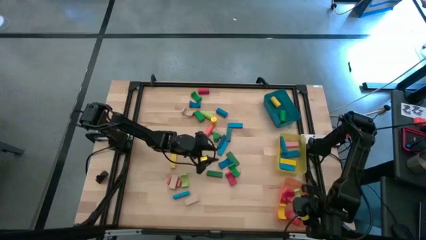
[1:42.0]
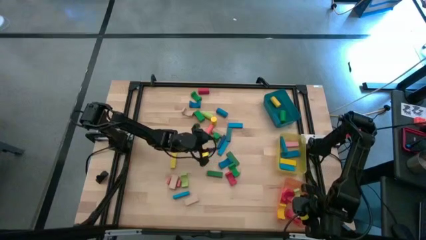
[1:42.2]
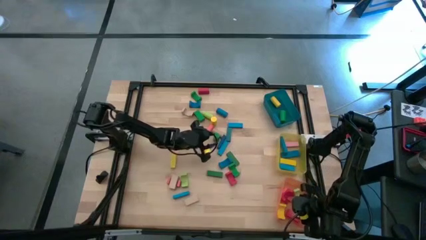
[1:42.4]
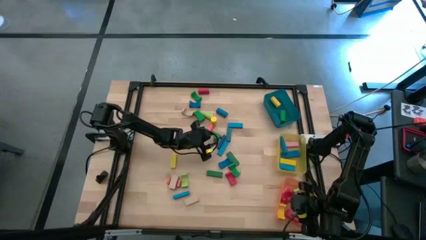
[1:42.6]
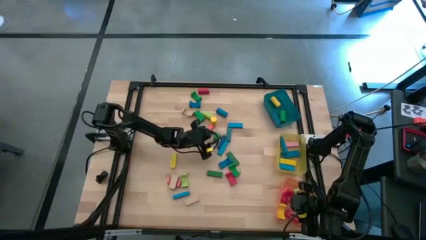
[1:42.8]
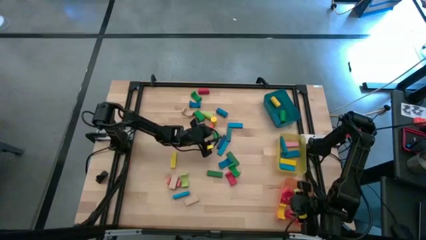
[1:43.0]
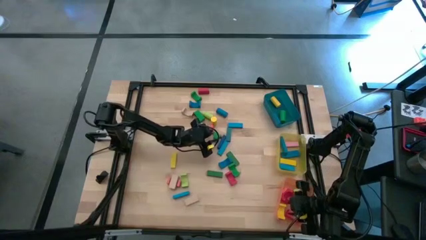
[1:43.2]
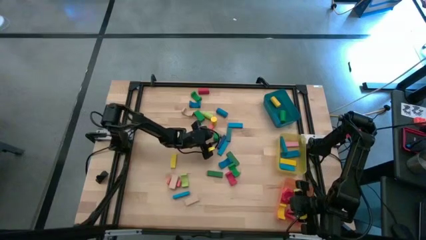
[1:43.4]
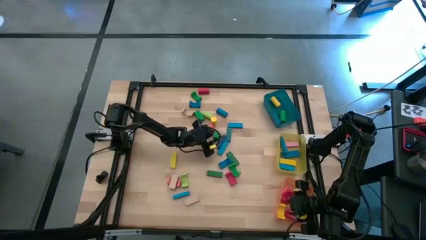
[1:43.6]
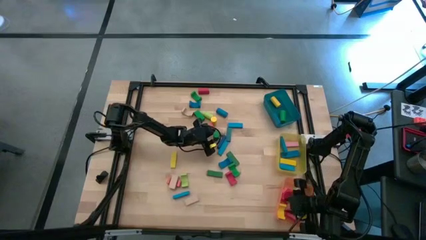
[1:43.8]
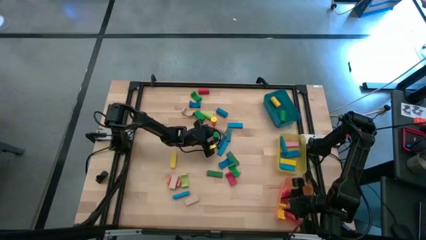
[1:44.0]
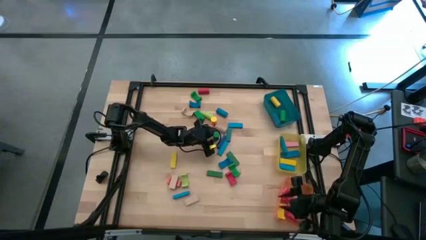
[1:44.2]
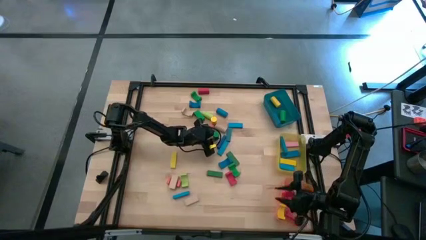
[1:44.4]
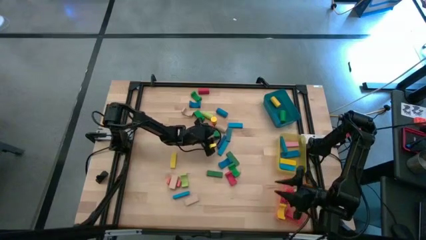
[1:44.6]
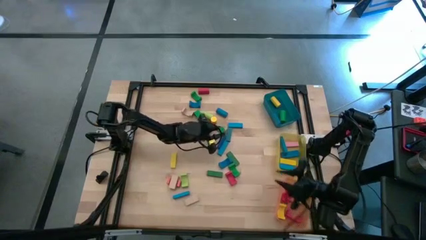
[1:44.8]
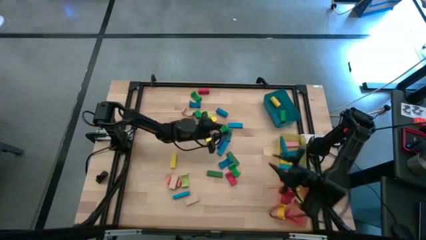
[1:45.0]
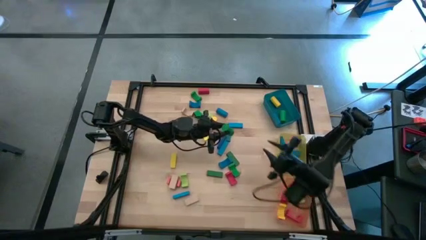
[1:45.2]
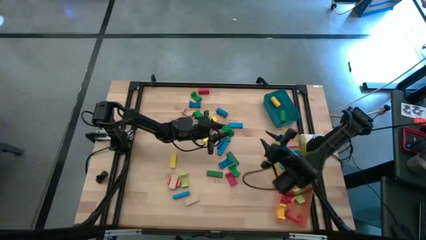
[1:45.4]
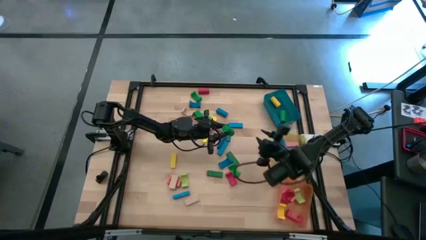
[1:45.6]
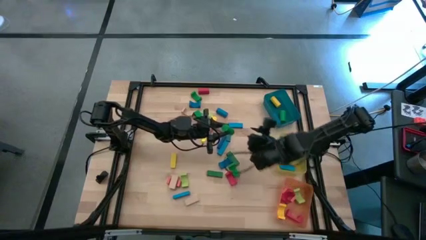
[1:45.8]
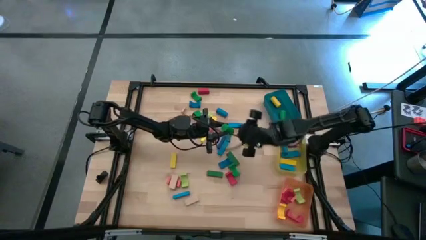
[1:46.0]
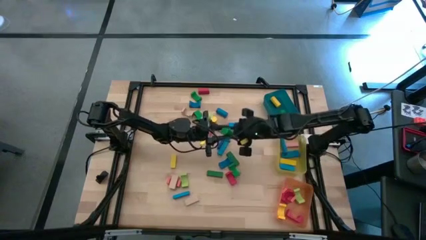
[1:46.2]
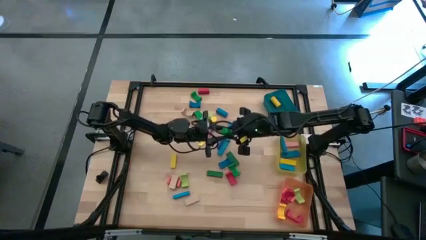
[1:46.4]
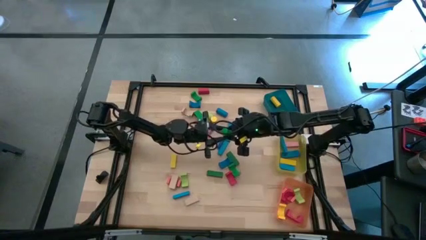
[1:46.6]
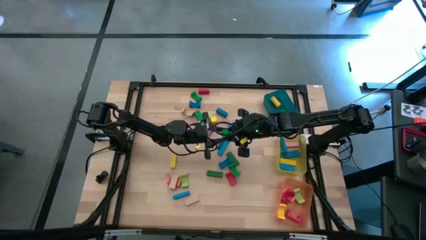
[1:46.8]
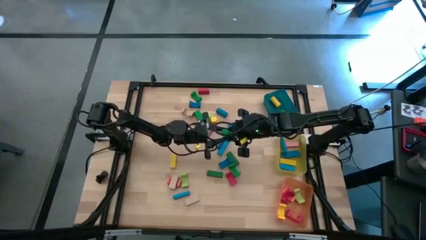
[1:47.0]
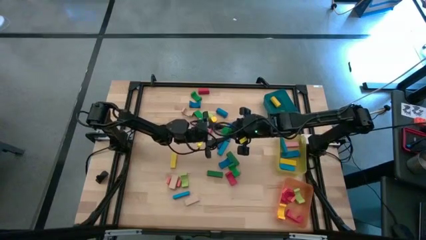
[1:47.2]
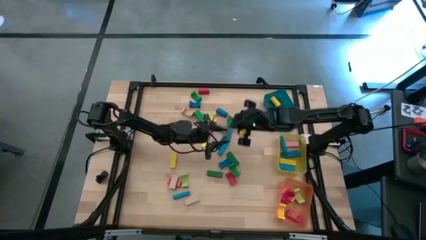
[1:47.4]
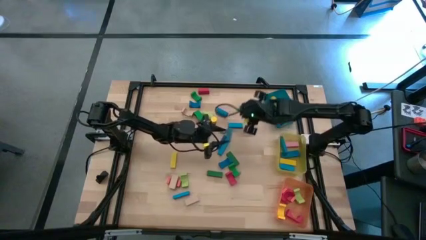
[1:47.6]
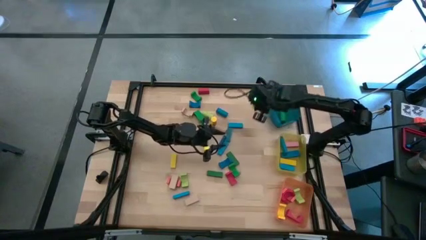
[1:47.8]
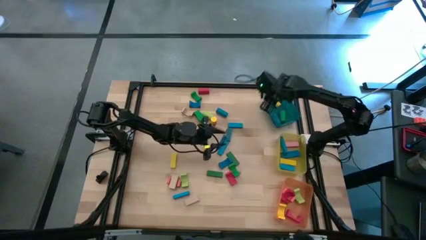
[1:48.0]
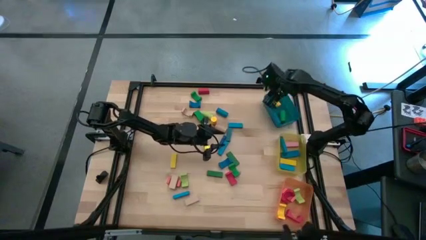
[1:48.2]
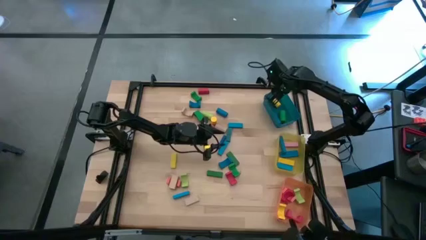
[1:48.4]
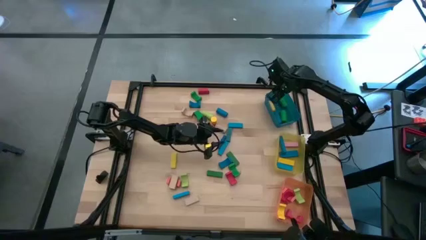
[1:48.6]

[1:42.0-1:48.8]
Task: Sort blocks by size
Put the green cylindrical block into the blue bin

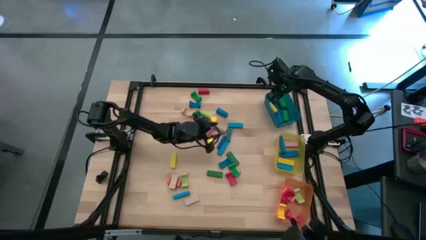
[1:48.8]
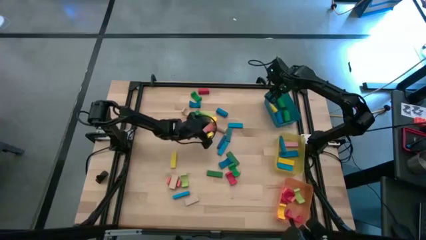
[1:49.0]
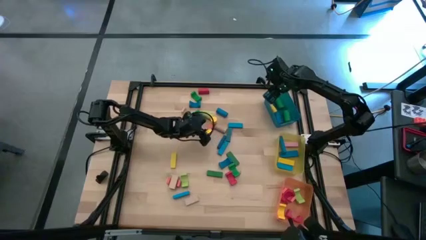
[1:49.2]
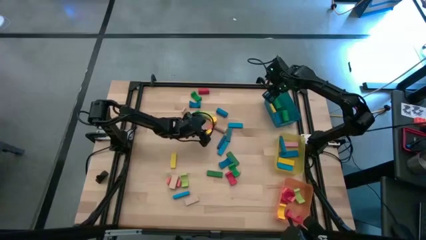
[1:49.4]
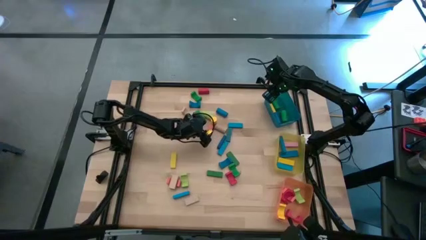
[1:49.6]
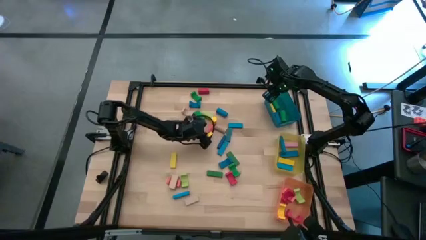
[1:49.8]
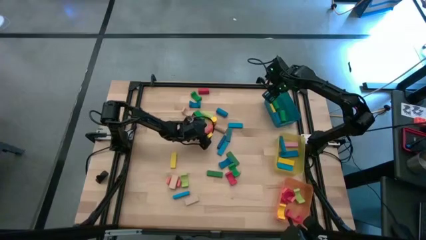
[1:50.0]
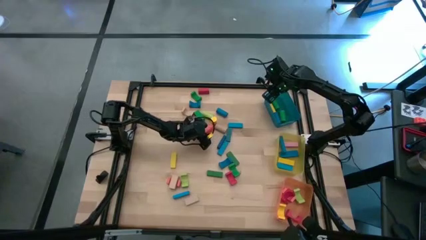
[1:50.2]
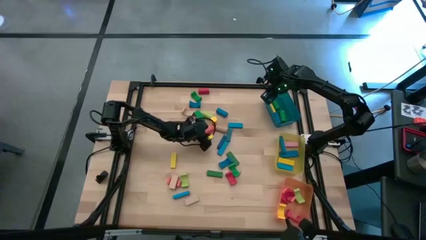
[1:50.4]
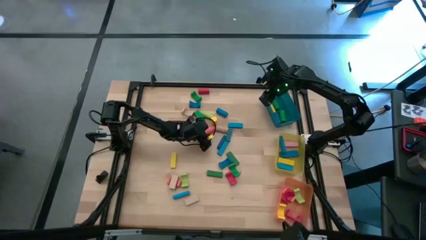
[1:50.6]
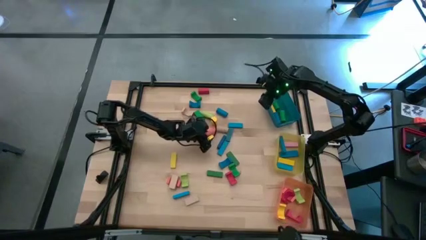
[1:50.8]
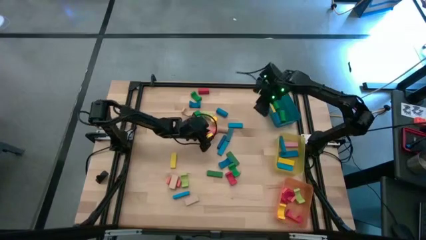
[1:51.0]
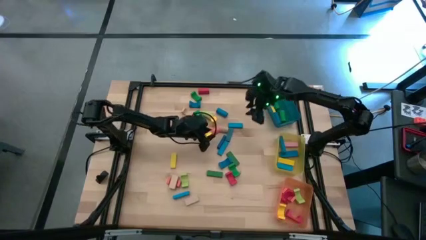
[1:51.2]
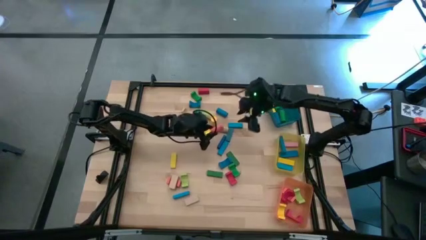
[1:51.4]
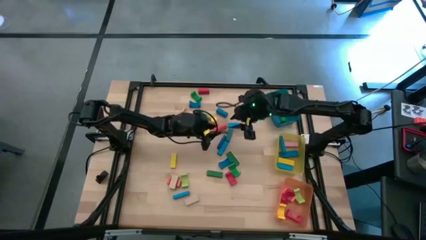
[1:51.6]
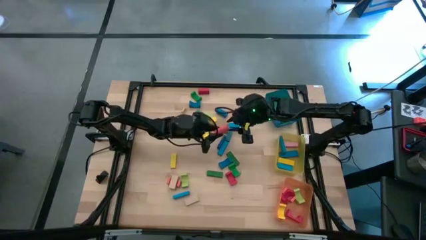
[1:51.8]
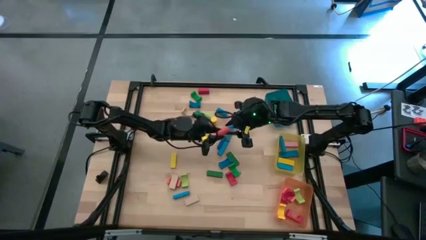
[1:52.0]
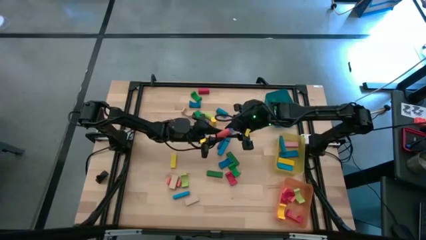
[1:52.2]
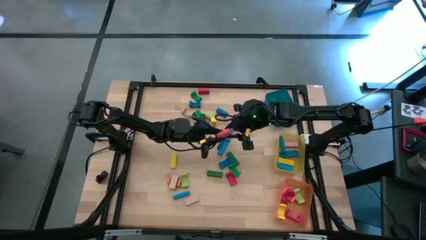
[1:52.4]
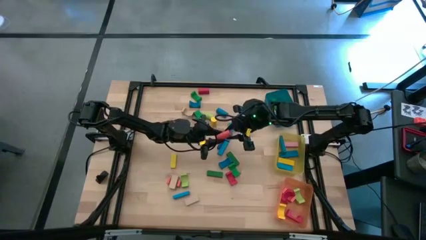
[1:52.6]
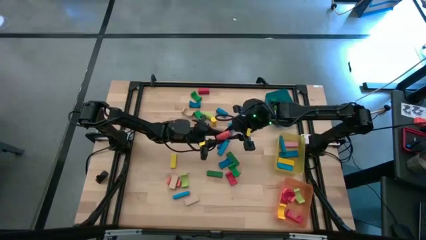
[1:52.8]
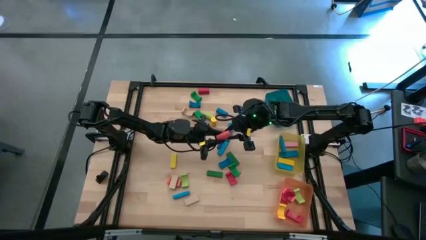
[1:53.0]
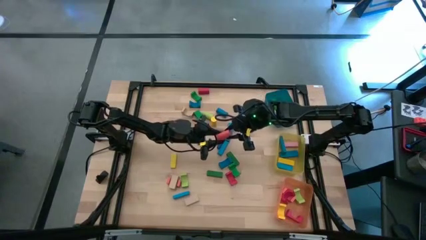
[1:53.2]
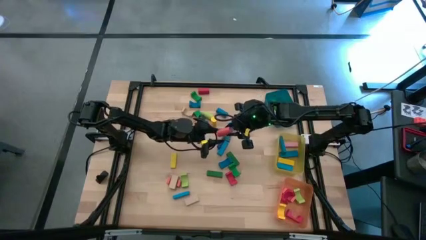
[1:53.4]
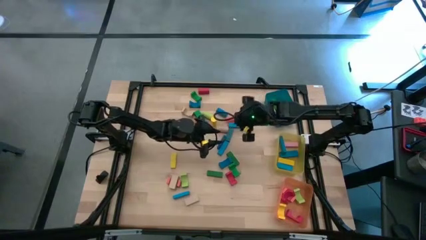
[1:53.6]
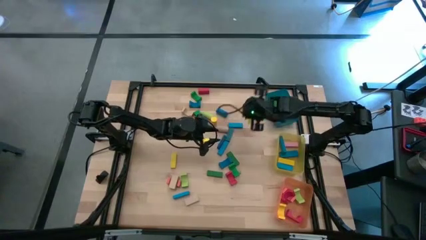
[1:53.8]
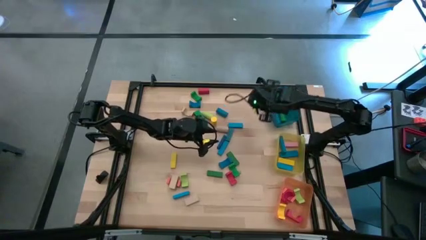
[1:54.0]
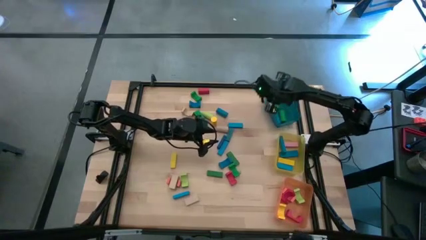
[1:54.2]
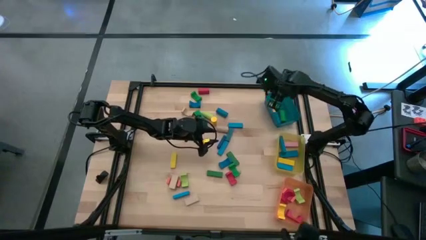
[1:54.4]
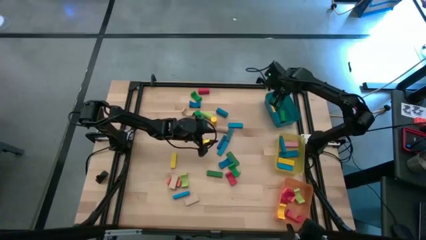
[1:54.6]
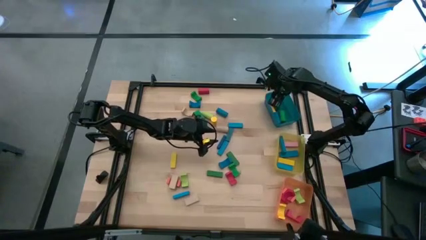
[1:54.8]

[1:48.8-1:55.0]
Put the orange cylindrical block into the blue bin

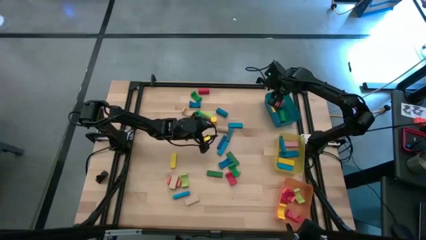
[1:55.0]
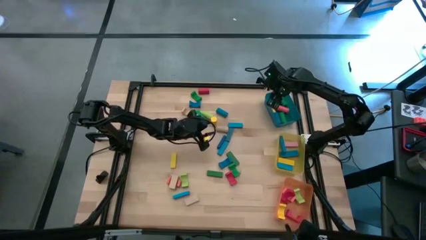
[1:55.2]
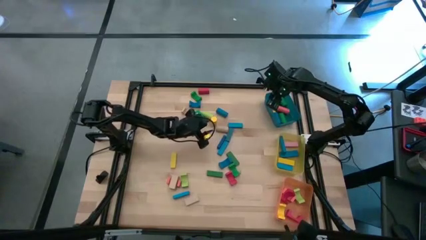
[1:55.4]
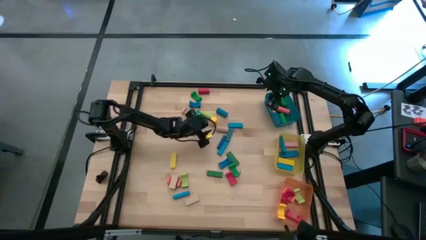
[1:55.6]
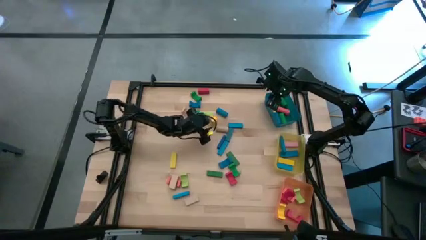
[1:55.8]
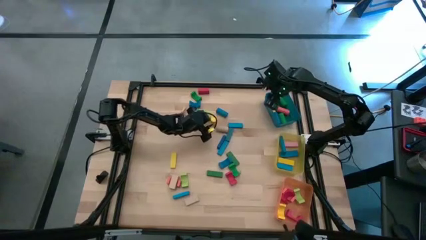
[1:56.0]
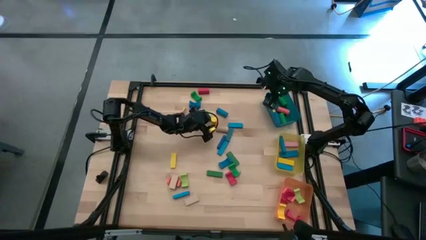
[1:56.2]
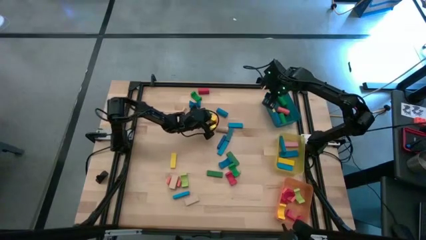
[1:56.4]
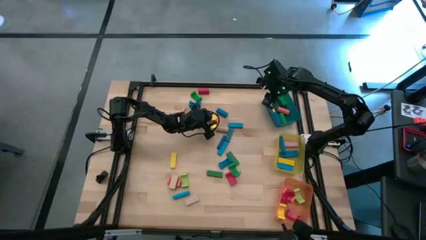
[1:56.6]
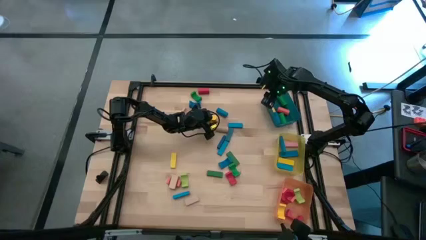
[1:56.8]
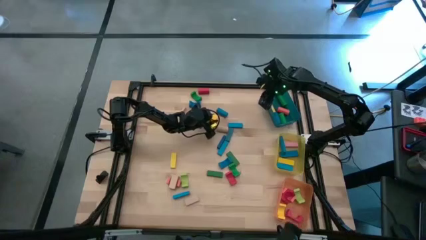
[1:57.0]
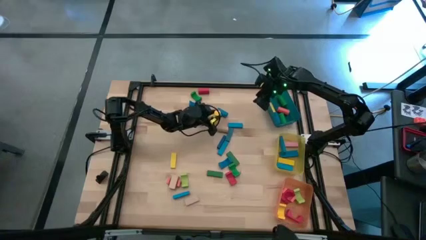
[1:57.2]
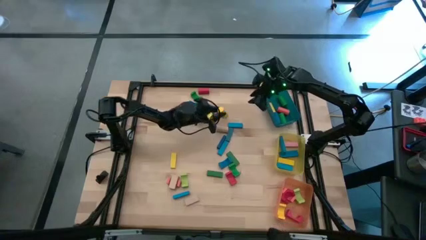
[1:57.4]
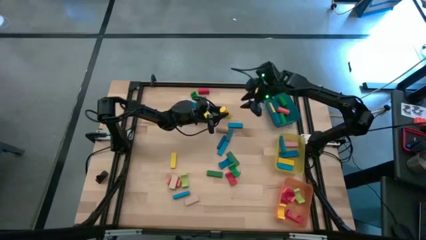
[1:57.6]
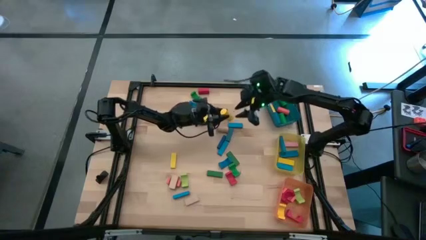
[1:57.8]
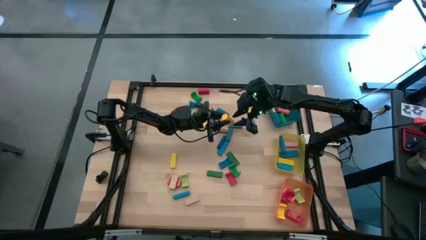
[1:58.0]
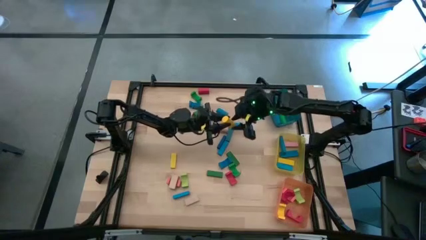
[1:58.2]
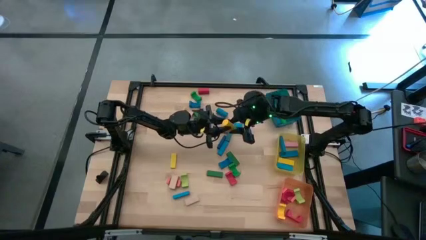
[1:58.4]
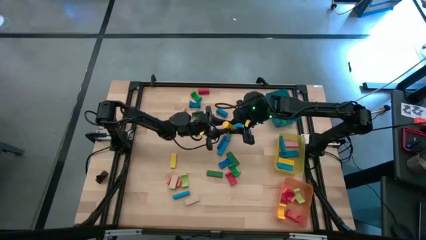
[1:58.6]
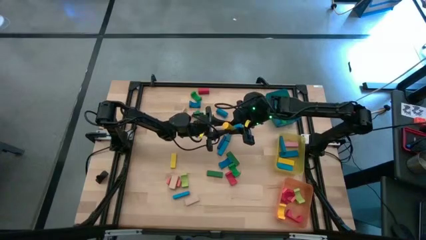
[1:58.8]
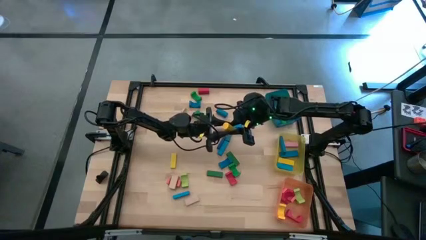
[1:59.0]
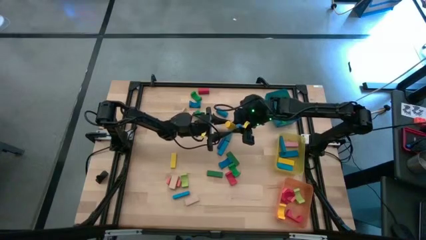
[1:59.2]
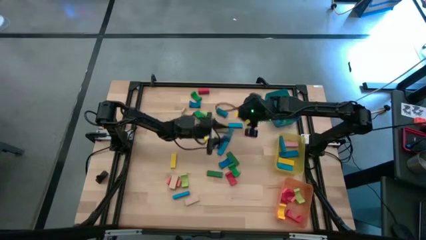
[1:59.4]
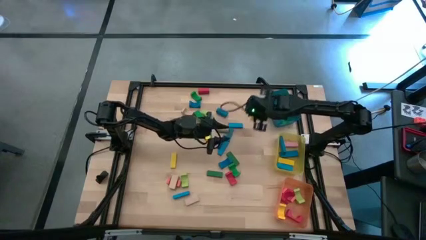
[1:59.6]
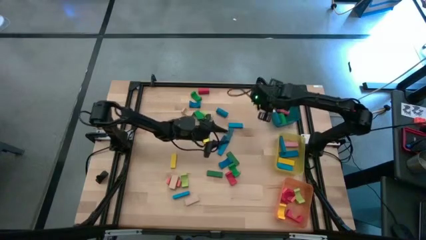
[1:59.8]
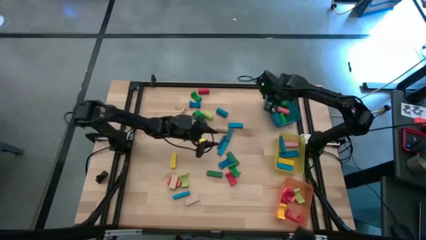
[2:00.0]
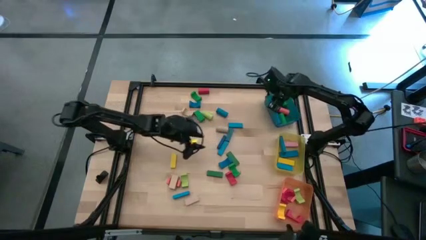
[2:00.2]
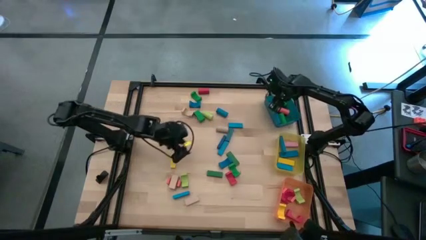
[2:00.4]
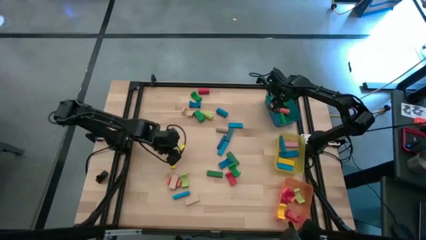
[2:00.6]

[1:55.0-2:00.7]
Put the yellow cylindrical block into the blue bin
